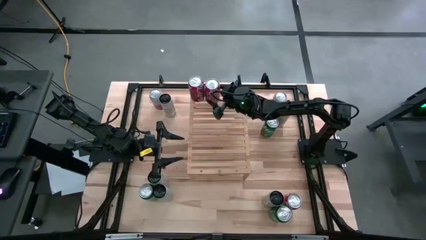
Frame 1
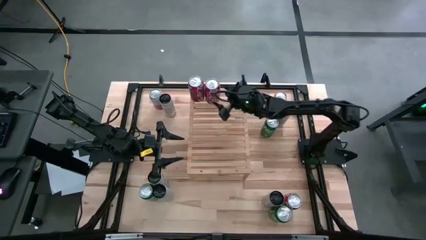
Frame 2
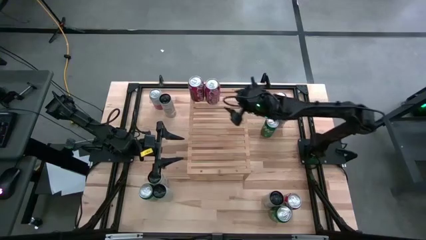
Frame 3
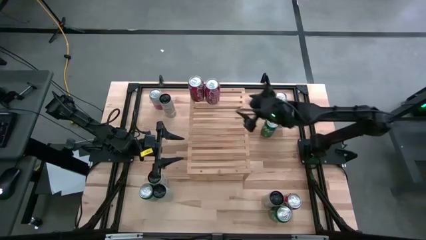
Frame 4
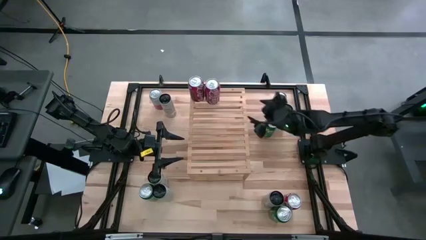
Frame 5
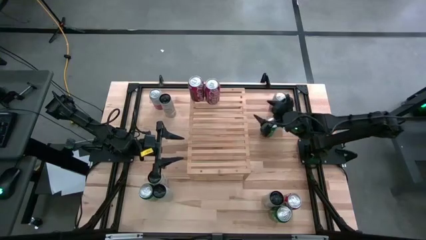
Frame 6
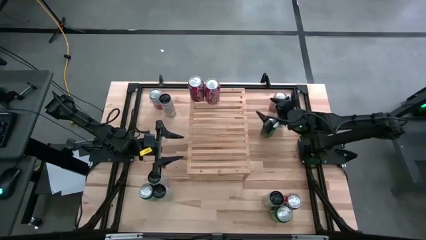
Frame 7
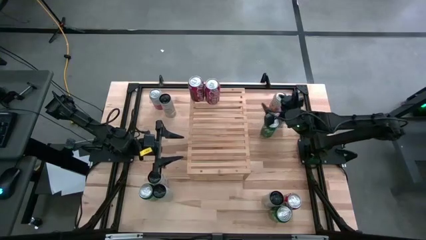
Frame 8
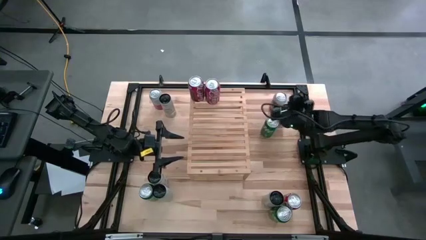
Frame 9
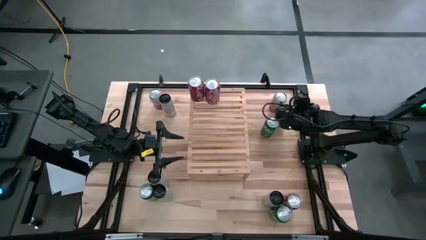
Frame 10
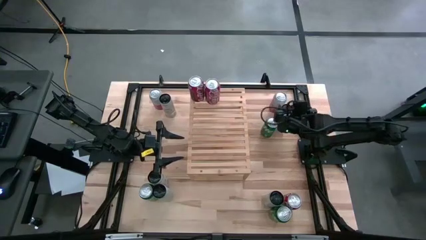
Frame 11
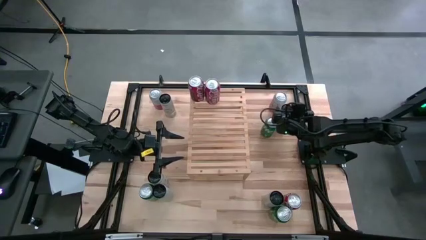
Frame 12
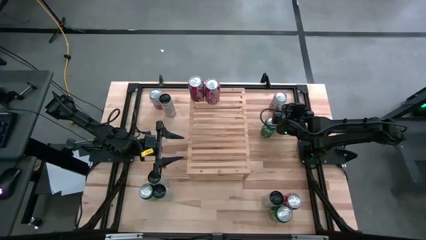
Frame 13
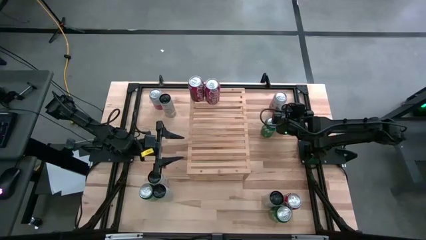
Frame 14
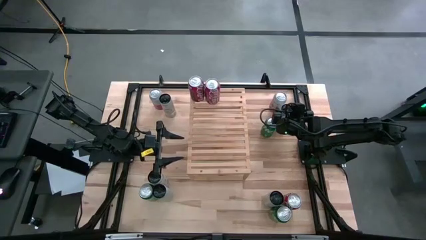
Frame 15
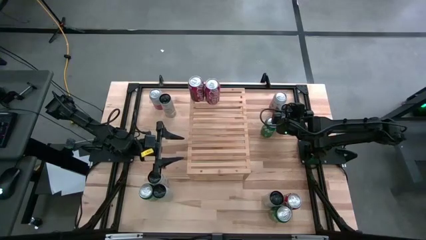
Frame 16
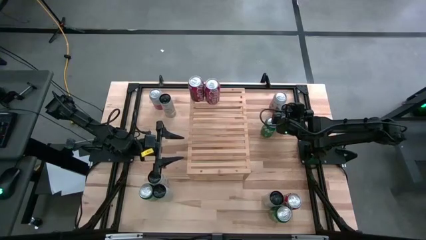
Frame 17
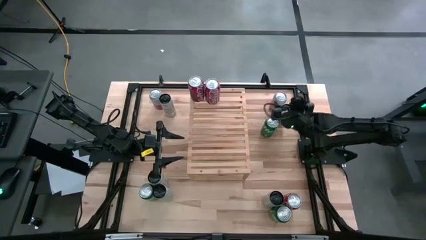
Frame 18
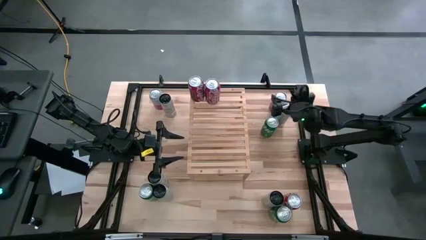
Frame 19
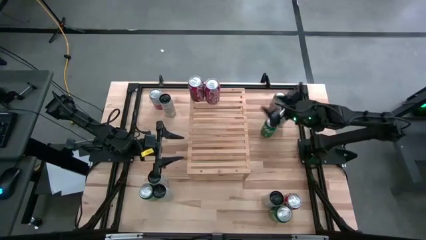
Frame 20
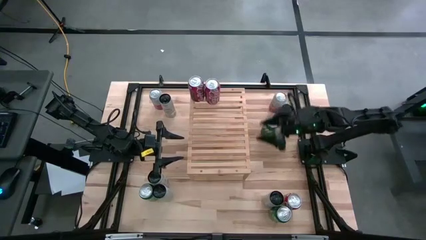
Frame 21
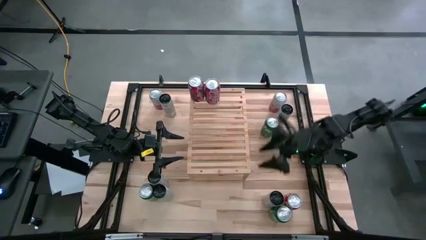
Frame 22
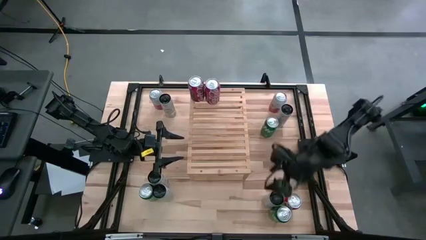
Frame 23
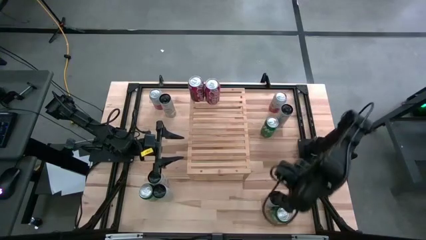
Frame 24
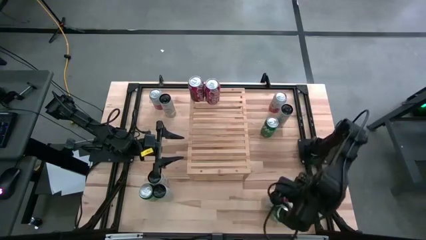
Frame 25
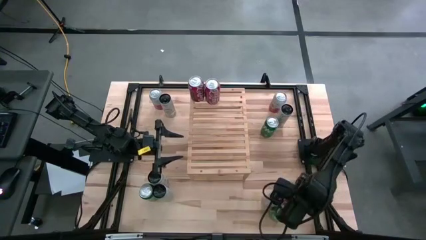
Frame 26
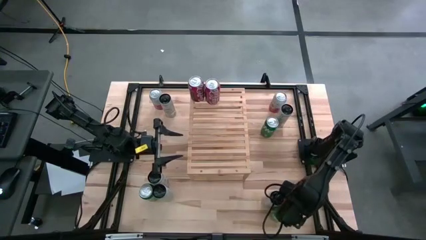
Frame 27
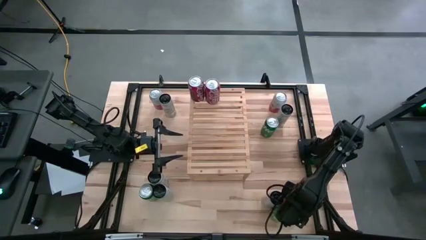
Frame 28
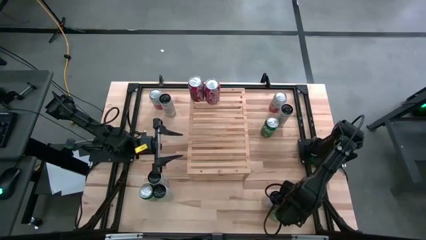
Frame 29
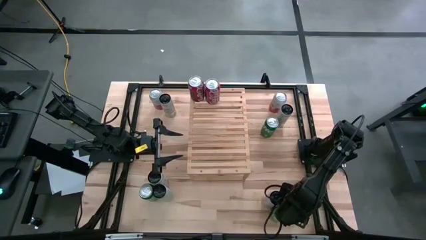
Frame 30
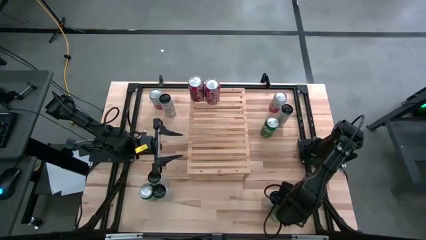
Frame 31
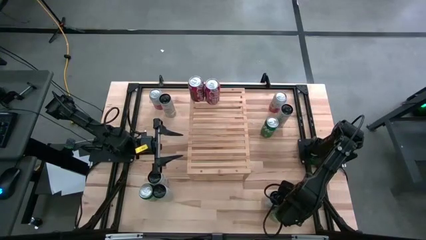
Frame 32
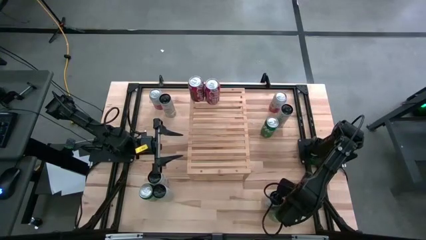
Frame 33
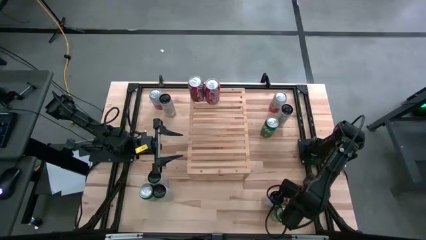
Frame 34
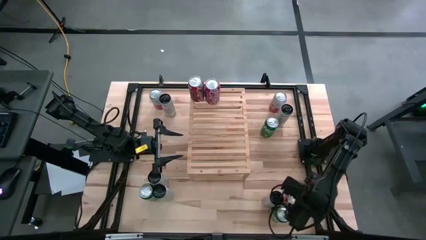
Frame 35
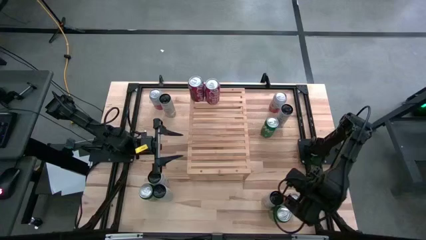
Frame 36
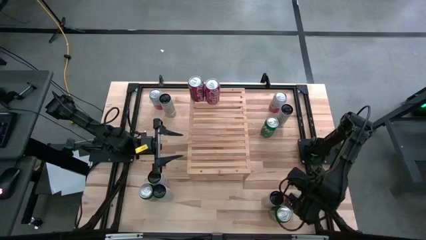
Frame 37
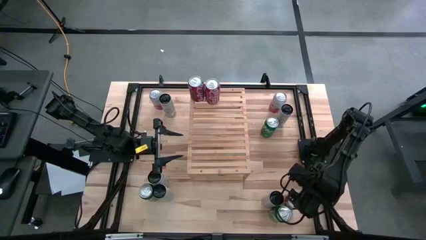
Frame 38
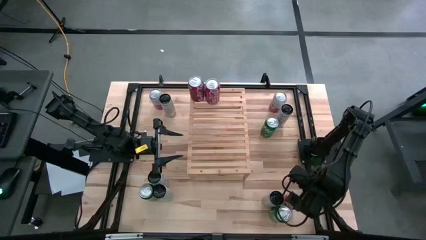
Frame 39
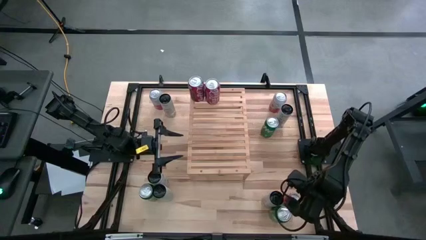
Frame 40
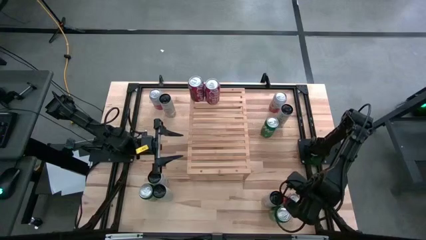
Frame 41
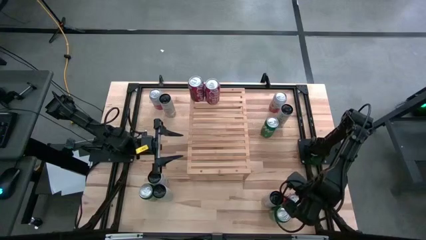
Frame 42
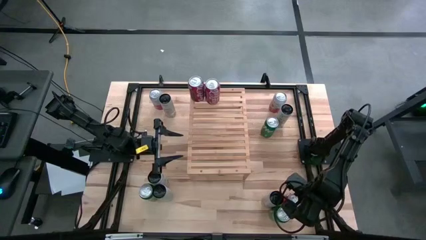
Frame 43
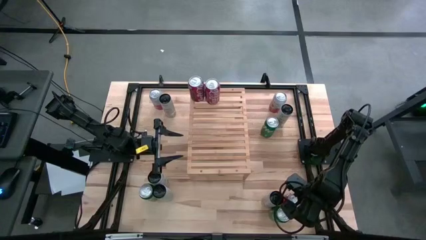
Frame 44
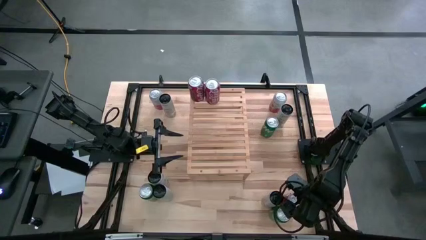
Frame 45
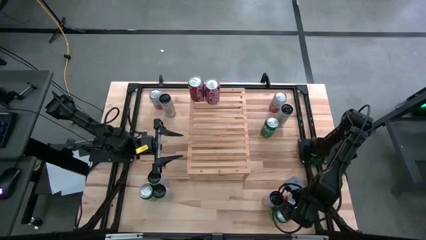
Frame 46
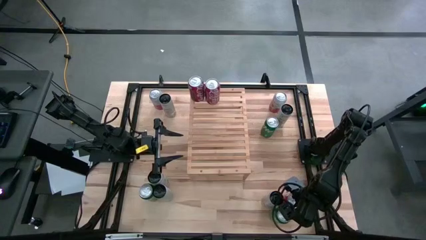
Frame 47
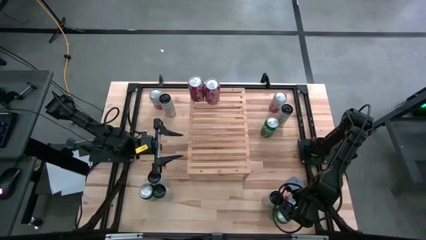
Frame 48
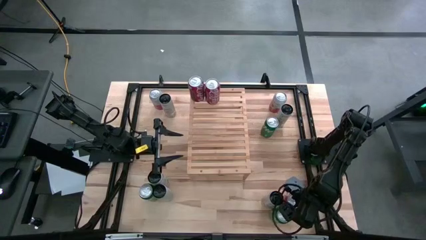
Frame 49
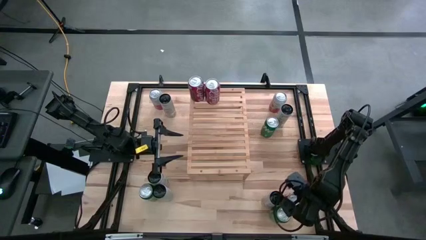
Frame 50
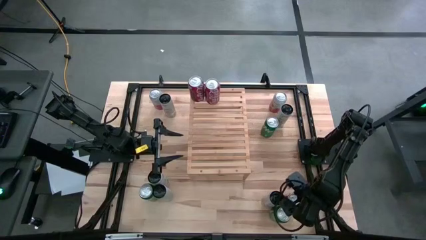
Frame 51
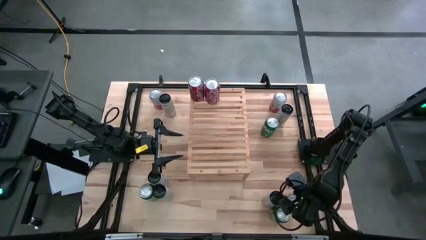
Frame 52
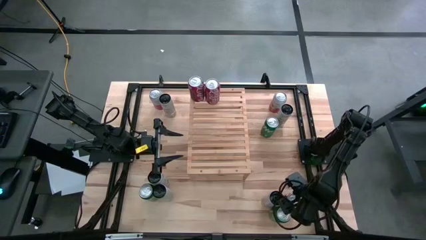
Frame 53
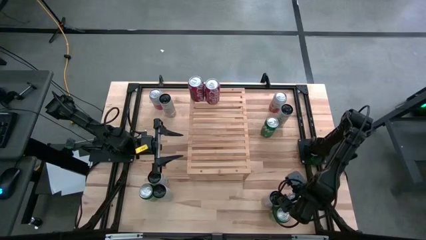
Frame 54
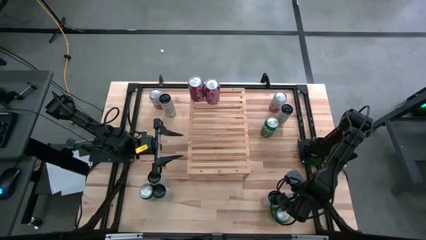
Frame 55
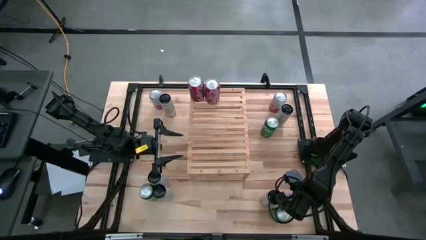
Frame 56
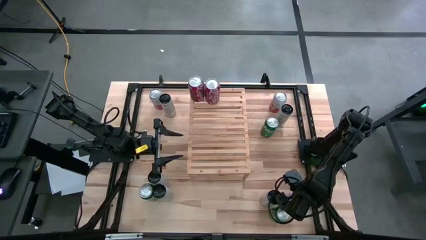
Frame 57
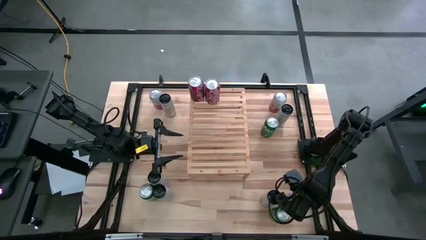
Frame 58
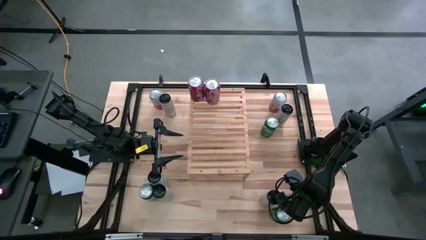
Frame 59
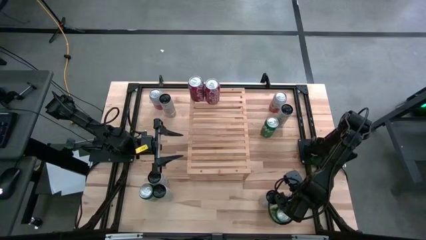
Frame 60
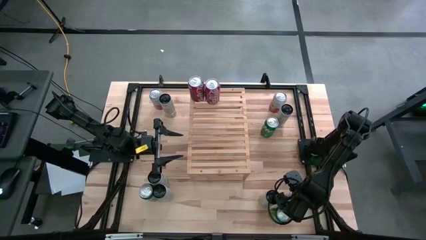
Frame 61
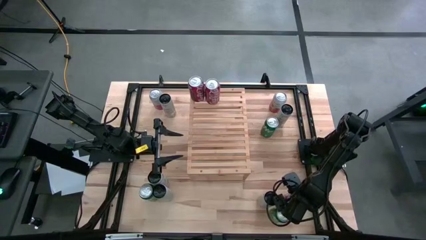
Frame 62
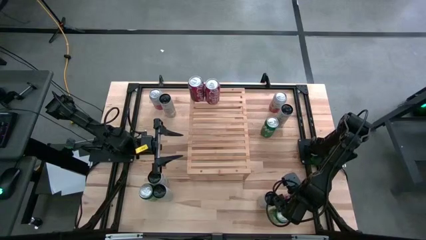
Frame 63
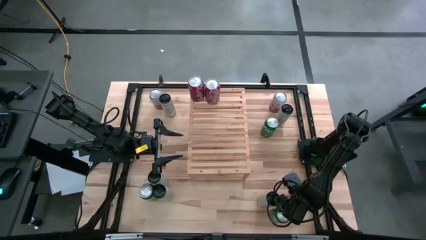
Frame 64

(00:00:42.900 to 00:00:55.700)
Task: Place canned beverage on shelf
Align the bottom right coke soda can with the other coke soda can on the shelf
